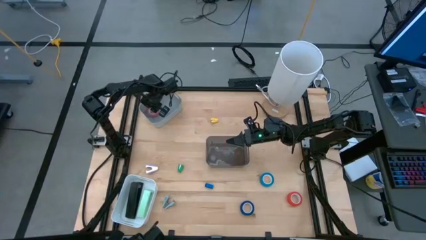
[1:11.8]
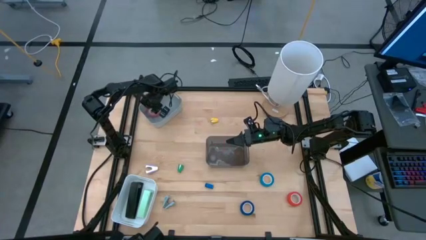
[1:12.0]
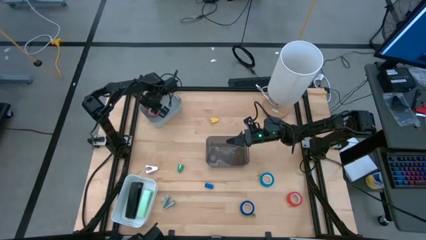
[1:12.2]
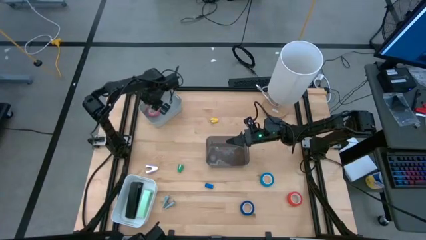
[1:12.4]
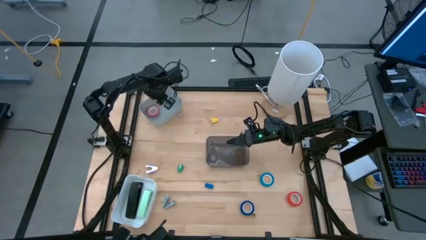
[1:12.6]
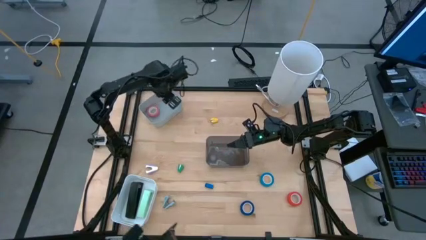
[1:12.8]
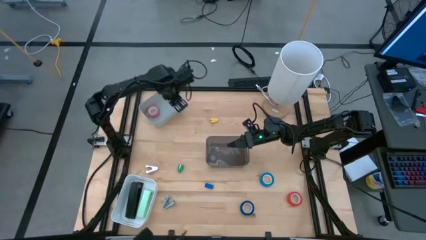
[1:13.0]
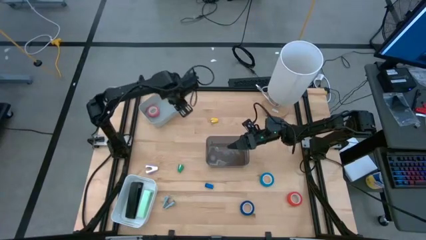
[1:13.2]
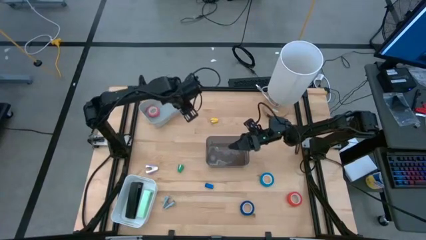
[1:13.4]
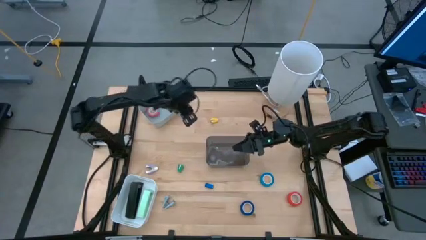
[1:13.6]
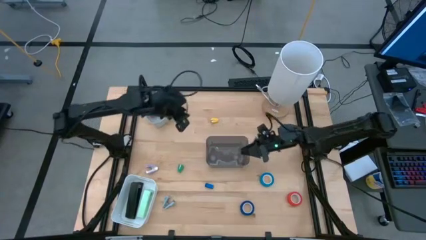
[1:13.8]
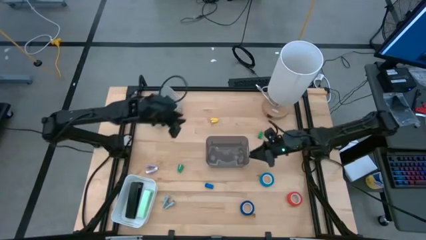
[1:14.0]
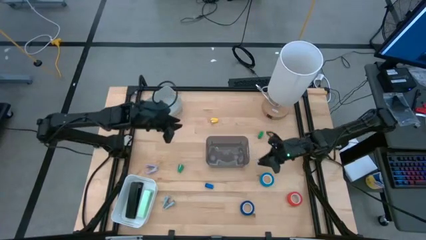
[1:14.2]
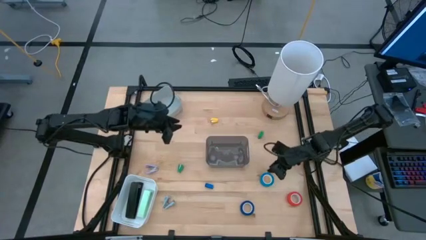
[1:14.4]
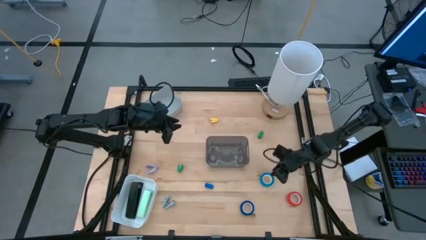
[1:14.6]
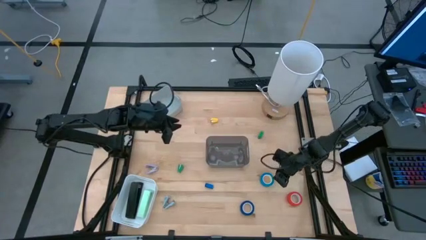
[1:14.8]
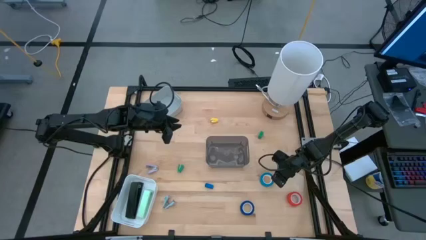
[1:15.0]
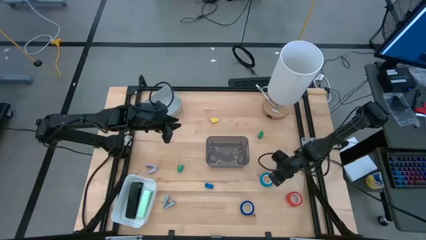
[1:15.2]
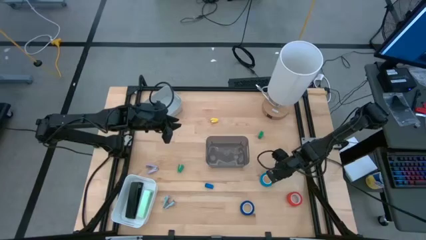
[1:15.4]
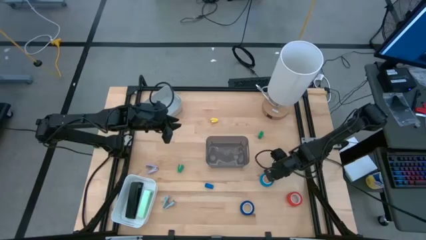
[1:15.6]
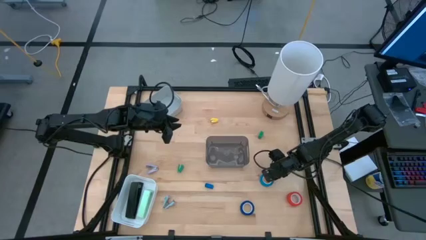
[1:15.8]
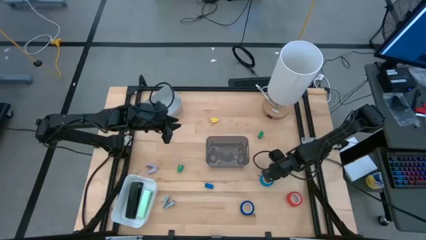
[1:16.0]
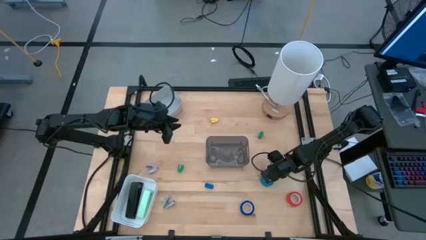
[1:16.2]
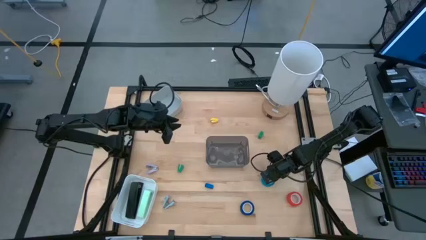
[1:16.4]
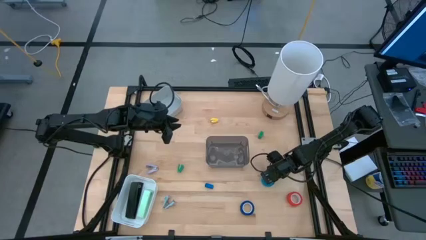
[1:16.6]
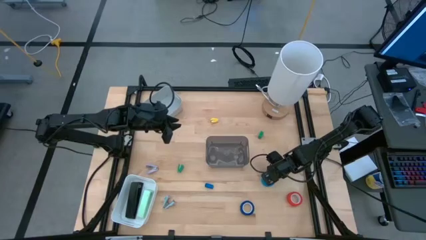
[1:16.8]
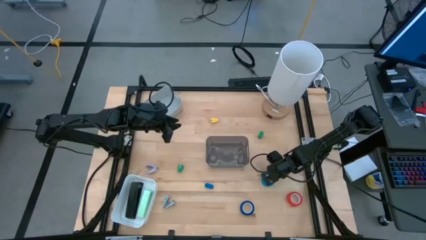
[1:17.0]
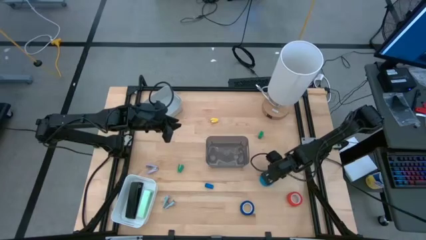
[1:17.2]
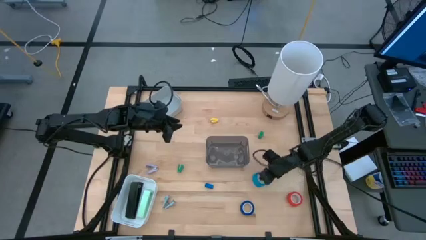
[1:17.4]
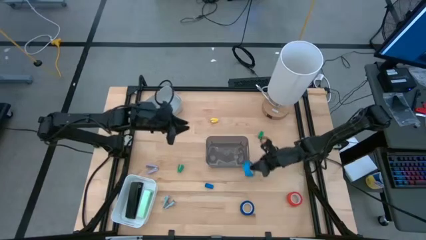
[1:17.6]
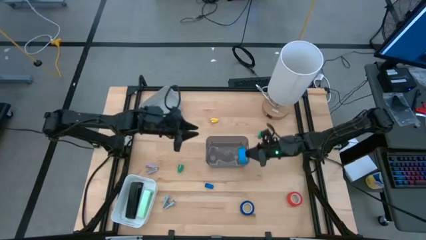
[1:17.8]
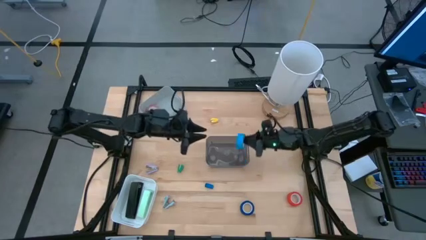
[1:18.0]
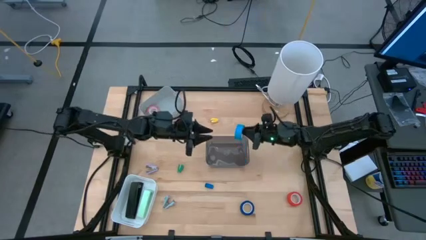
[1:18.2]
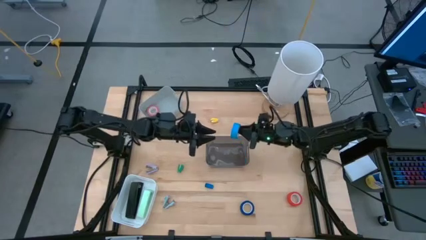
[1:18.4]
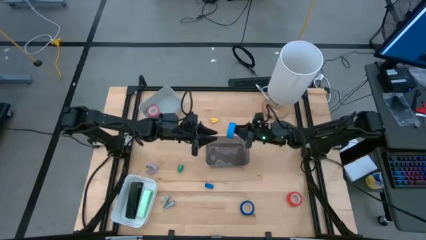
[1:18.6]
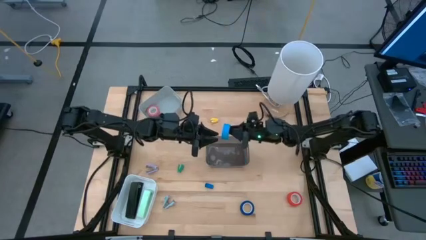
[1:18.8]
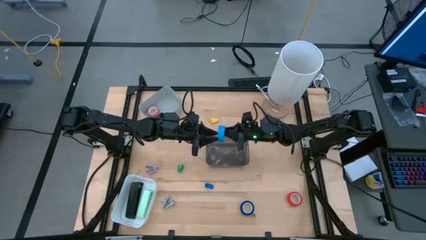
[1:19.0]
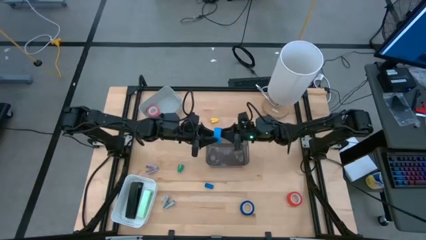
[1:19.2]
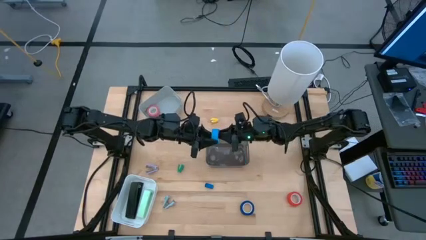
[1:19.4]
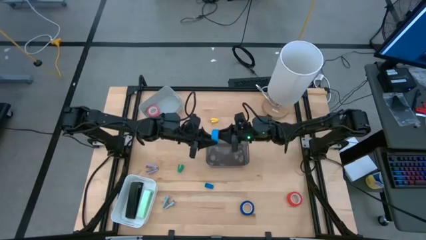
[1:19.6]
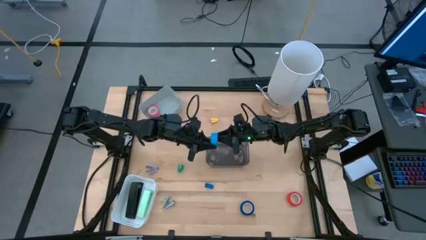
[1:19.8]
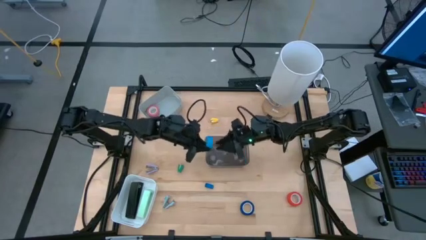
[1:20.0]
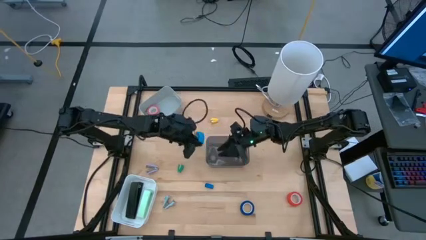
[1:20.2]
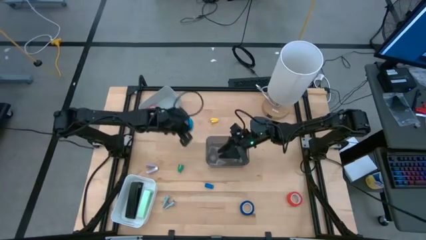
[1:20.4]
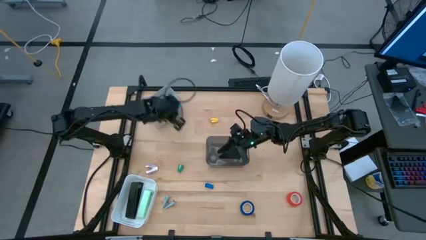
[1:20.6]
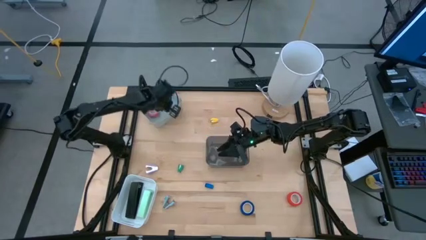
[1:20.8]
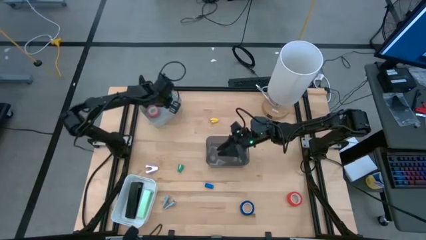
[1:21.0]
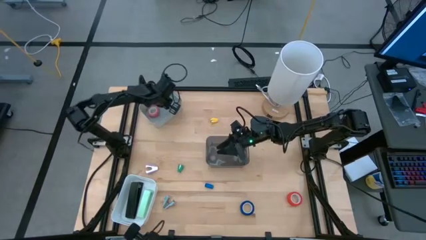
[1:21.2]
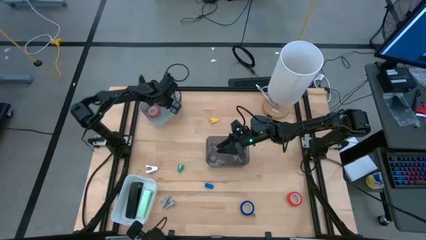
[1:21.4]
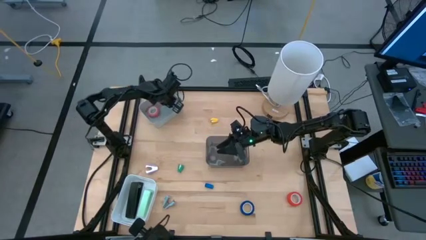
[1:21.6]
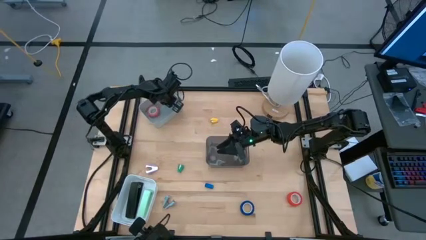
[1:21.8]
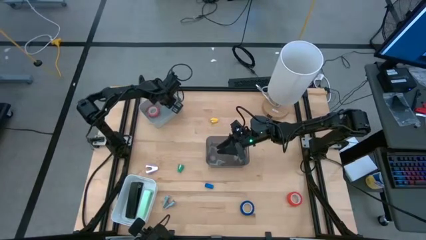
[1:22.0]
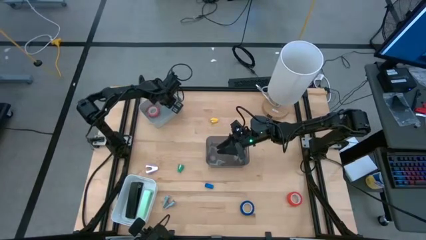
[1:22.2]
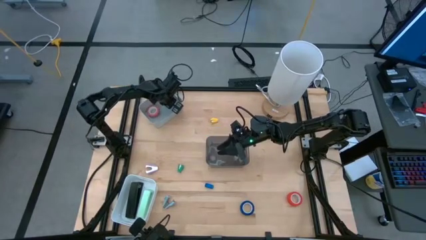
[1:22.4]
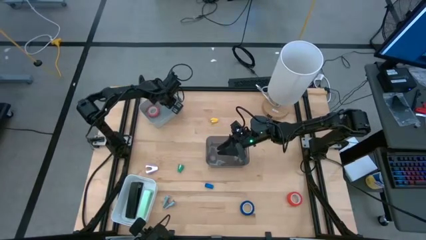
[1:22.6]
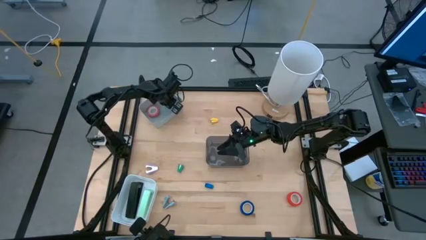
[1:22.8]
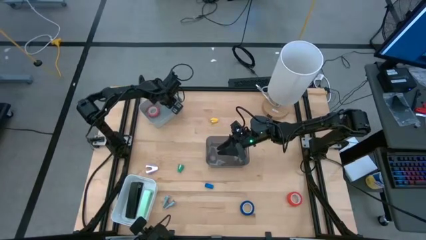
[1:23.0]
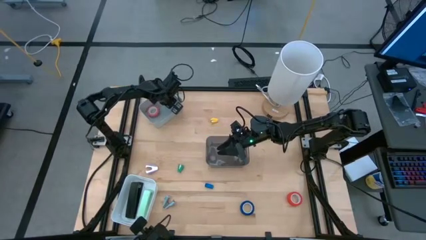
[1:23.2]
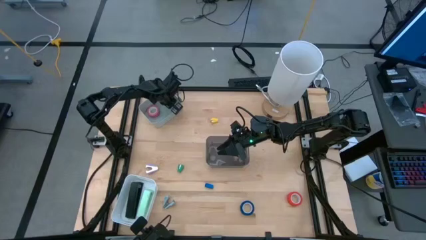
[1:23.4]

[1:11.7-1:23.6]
Task: Pick and place Stapler, Stapler remover, tape
Put the light blue tape into the grey bin

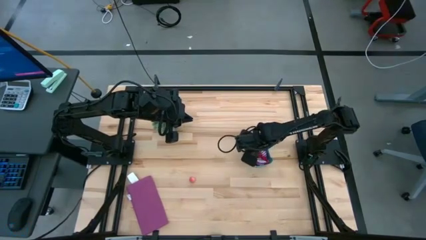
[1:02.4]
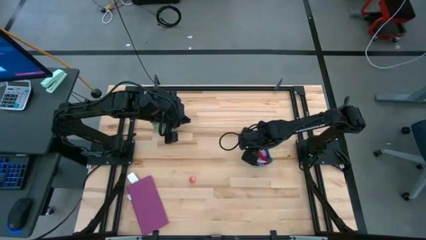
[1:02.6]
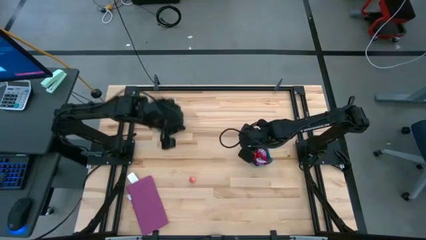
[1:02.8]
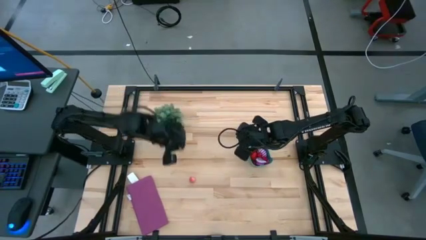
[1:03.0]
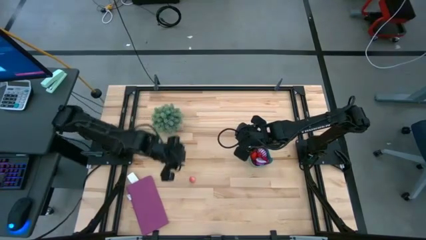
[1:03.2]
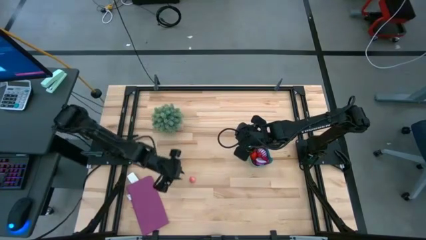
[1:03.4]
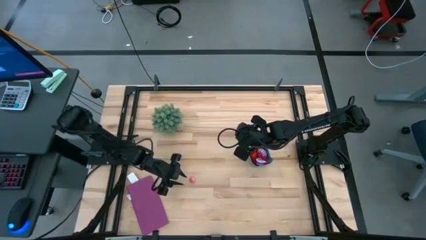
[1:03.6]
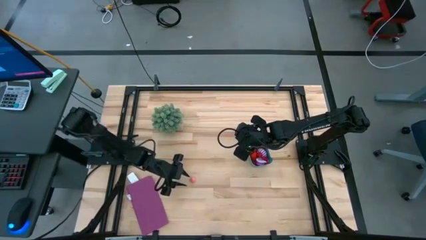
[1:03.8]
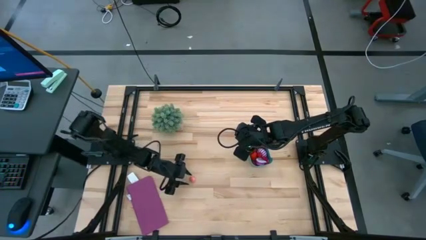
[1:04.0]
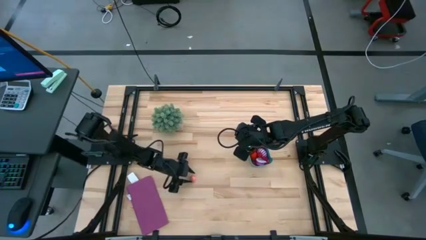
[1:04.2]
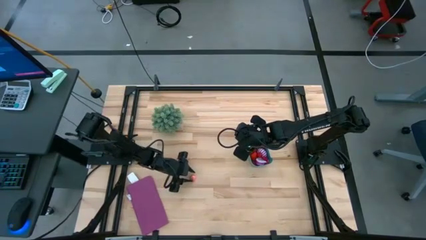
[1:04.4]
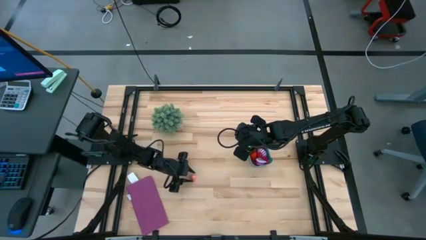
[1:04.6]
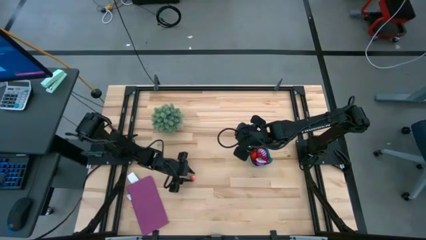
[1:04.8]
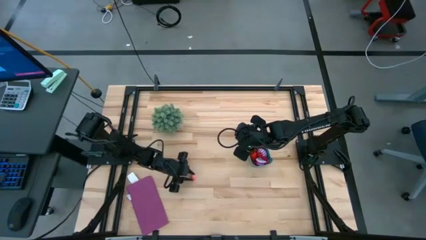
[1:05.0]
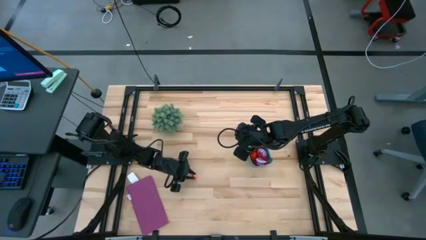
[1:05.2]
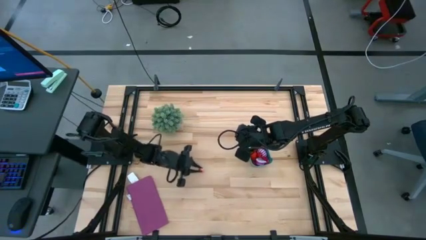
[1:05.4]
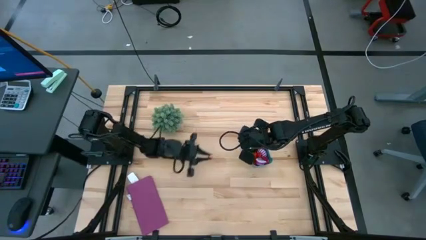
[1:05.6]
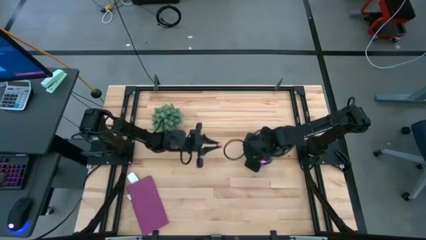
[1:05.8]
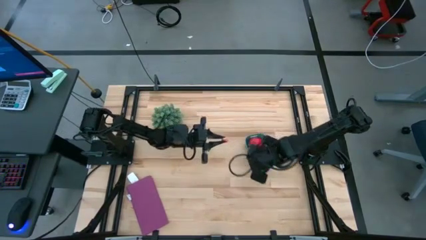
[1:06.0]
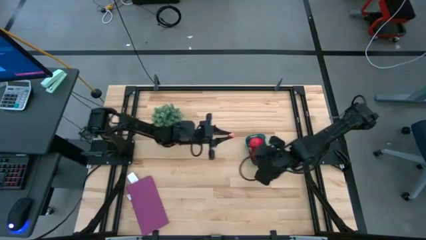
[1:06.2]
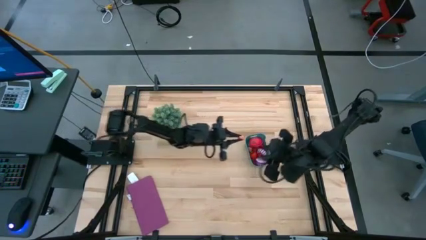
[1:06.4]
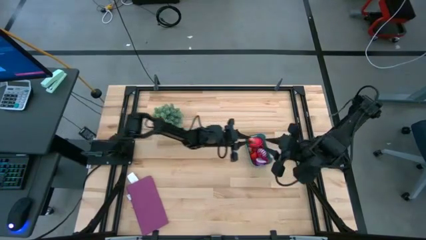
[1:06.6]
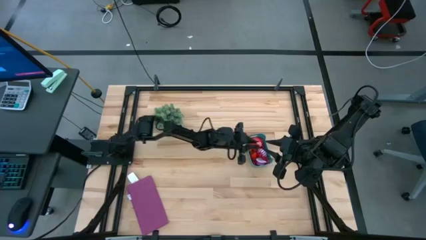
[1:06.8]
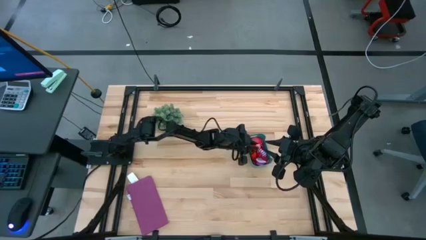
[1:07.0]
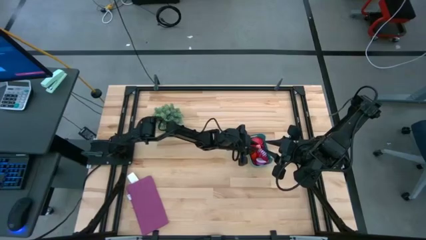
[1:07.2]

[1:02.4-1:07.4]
Task: Pick and placing Produce into tupperware
Put the apricot in the basket
